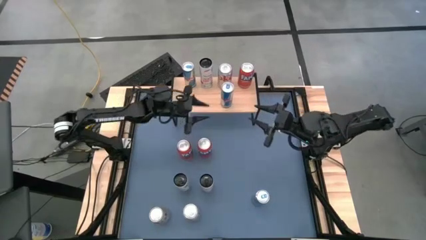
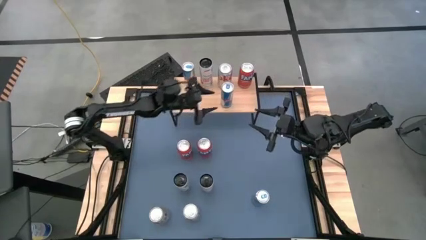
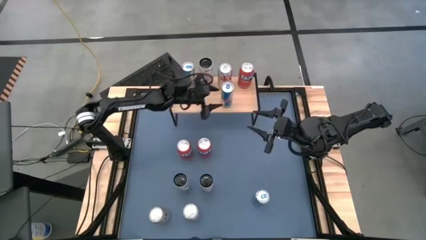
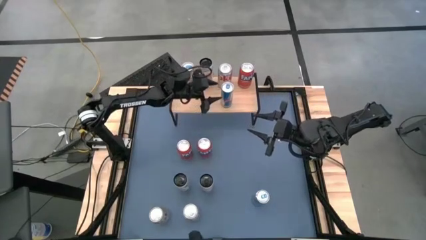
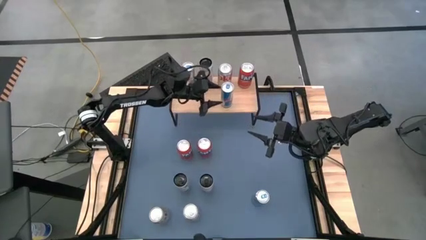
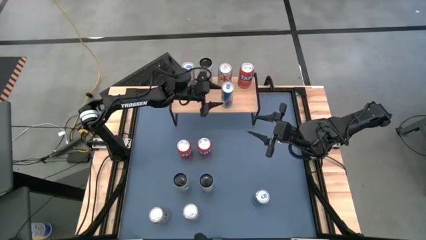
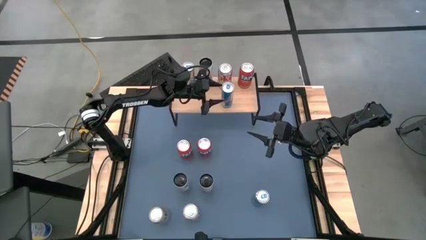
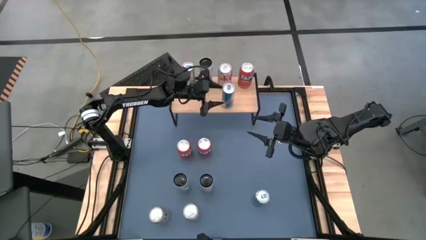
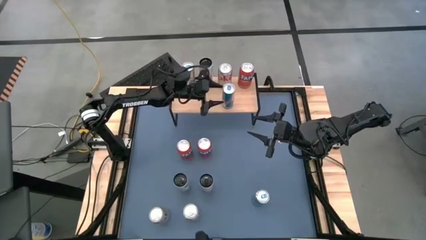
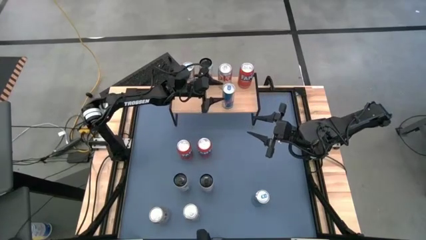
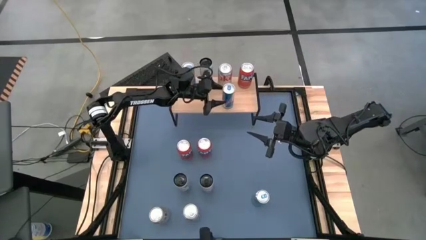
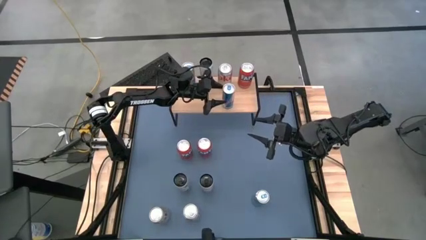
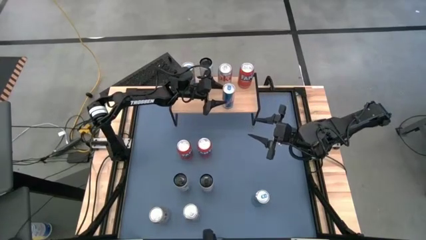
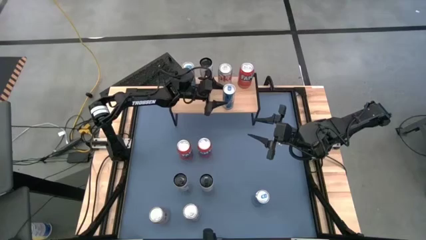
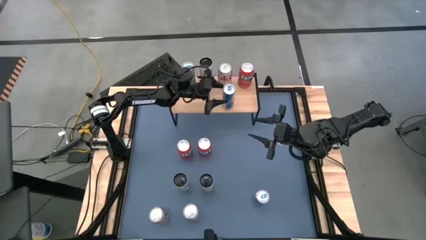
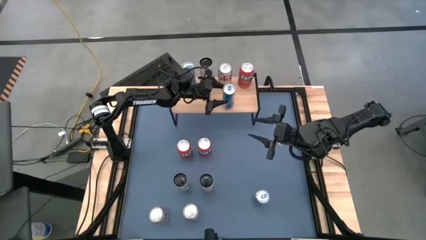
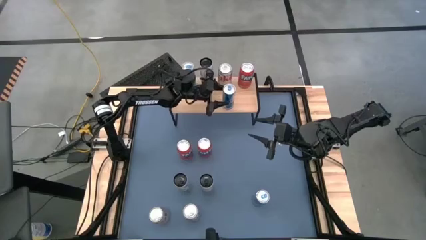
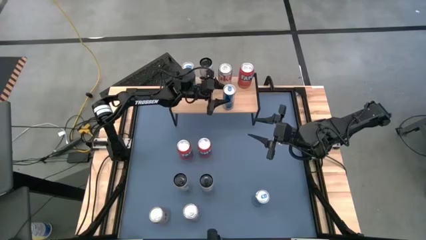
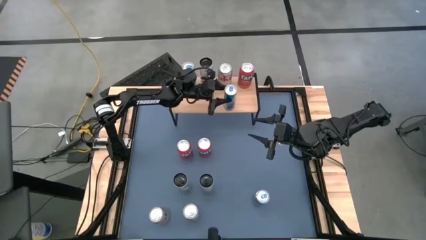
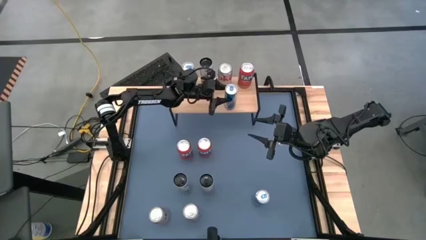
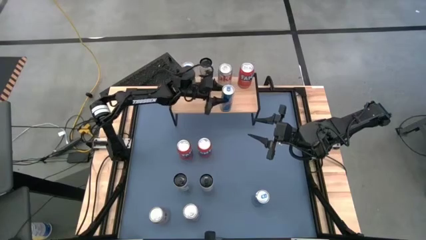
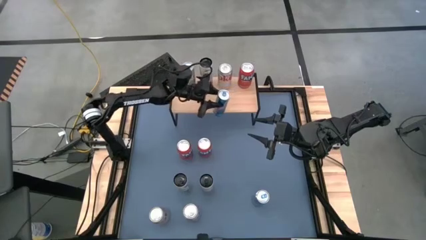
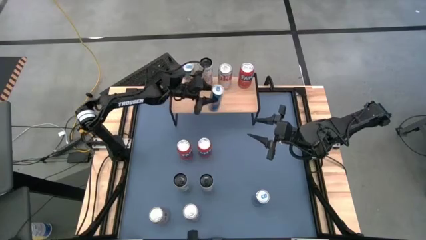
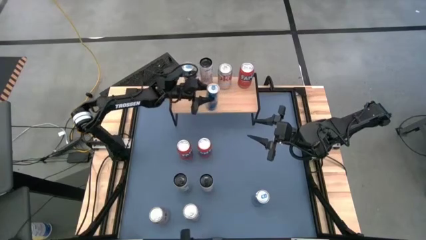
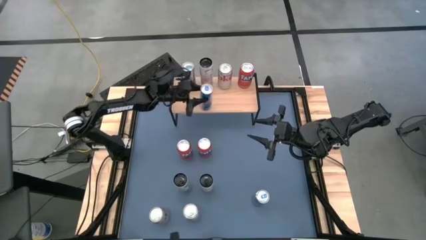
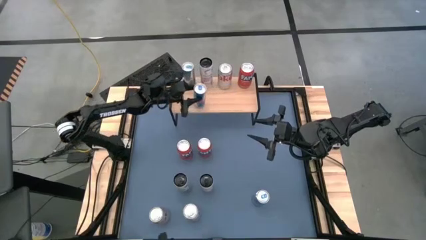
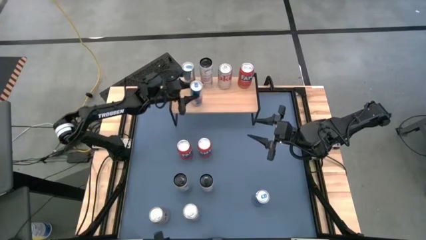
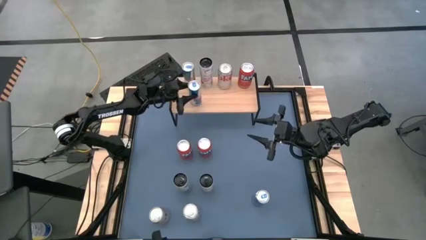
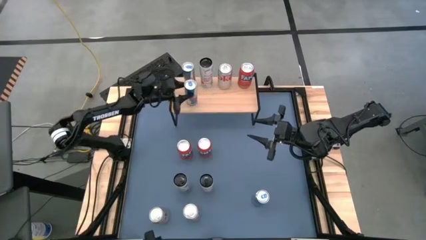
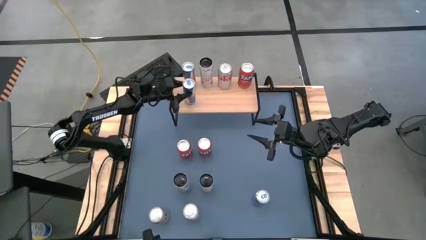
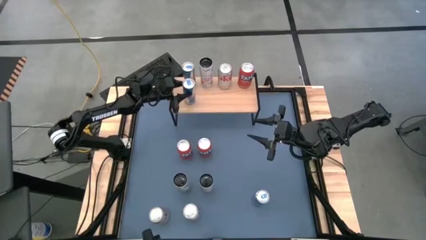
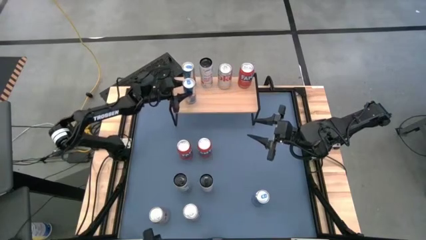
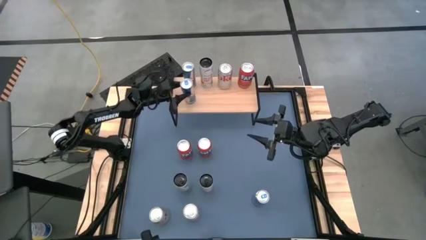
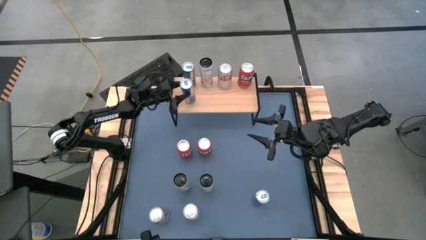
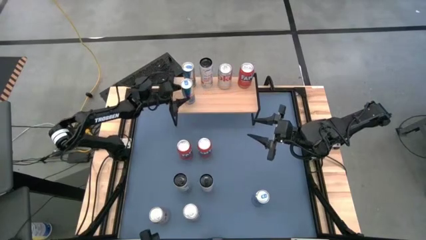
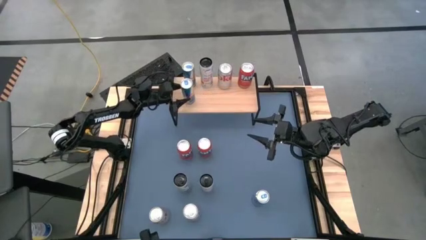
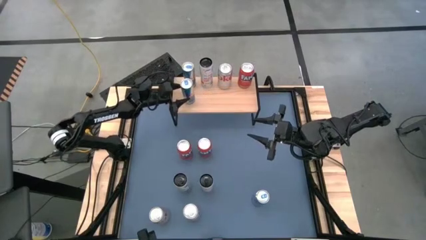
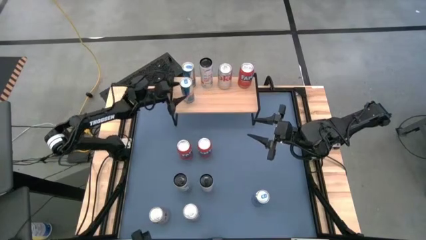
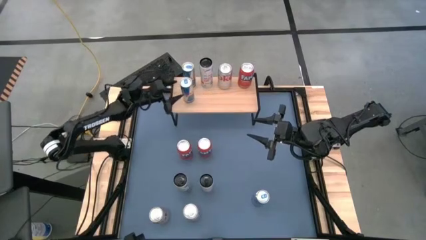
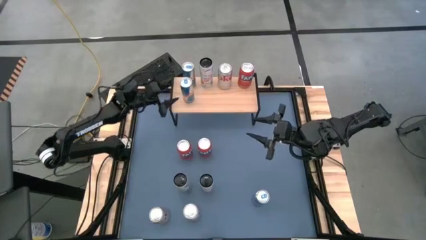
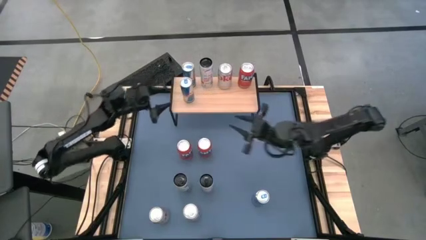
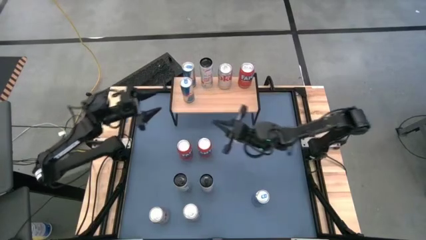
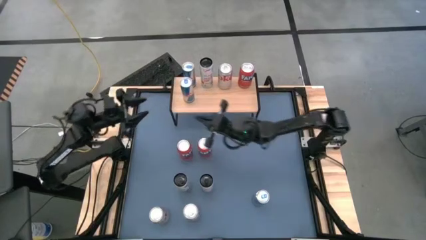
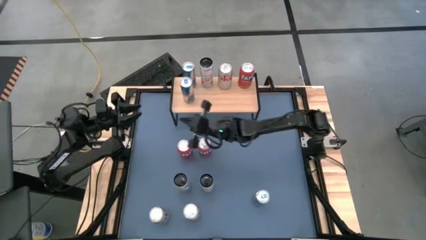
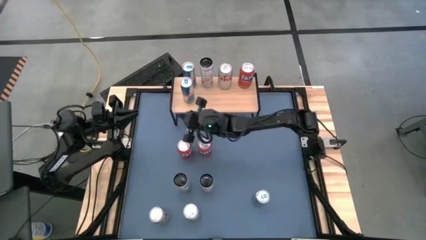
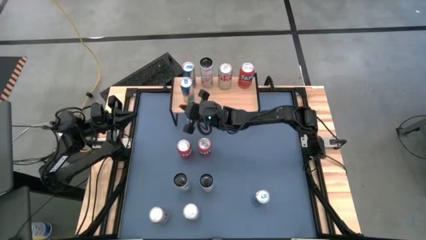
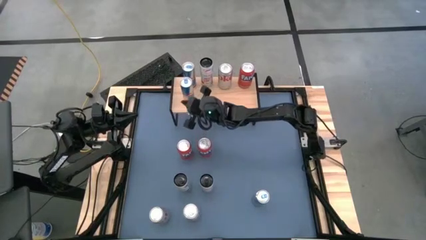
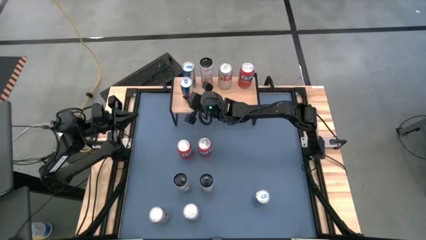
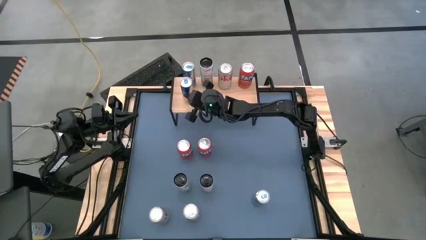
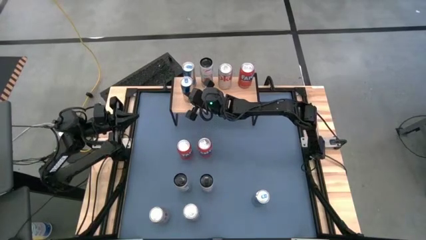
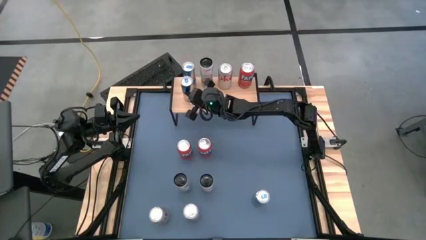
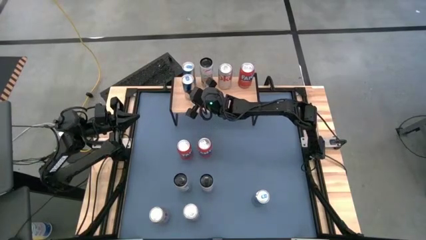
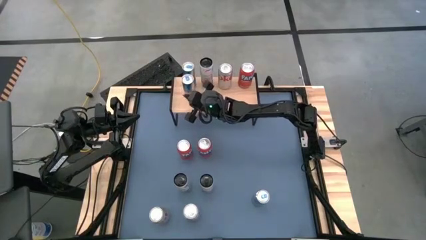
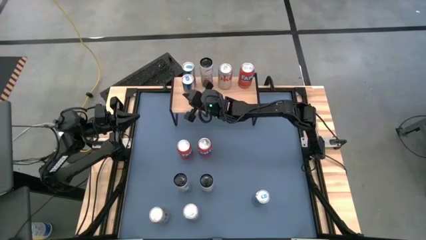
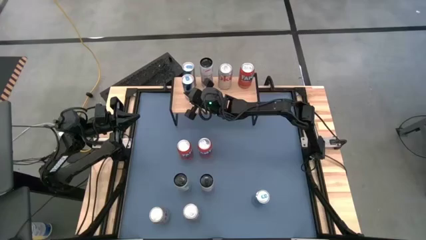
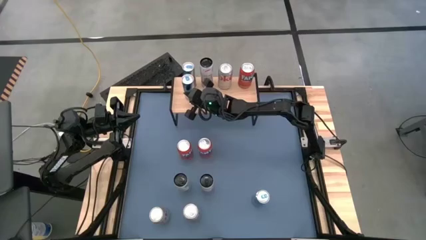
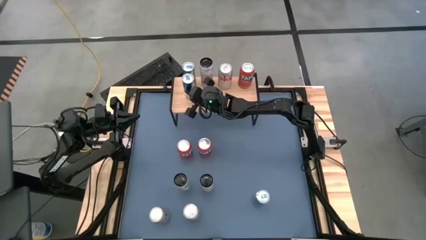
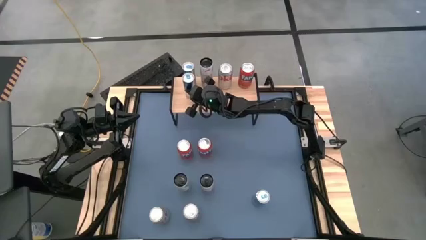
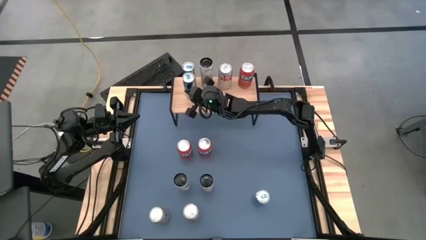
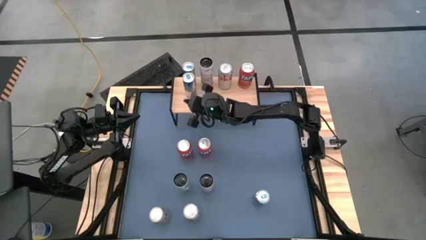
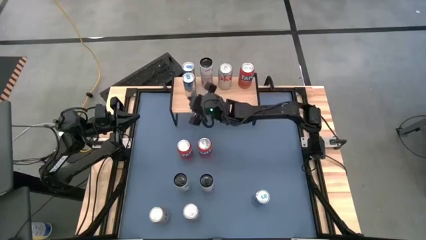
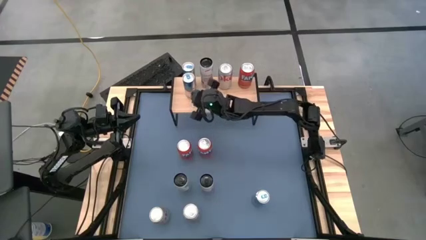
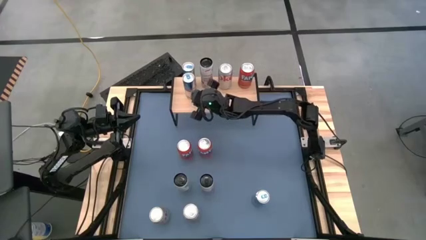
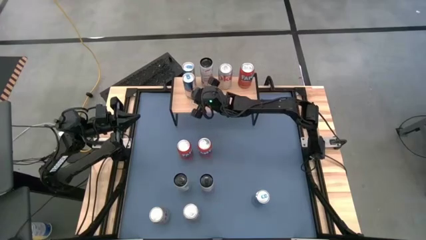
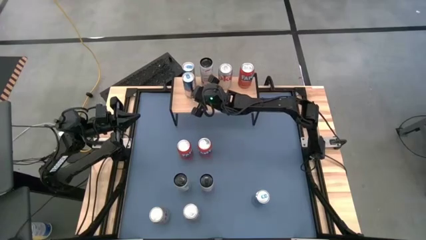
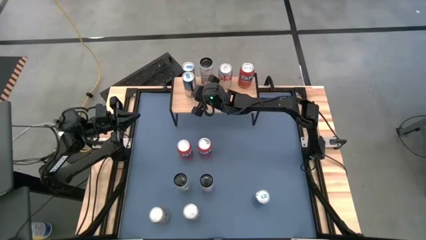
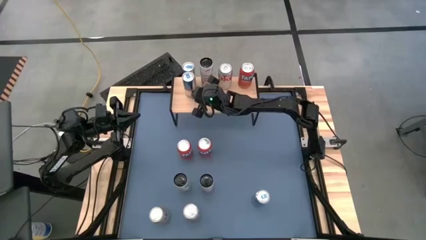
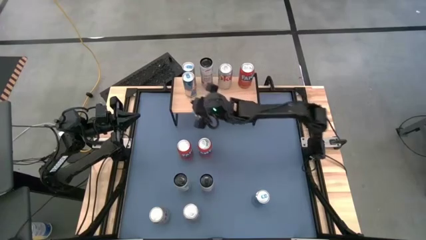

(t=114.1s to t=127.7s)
Task: Place canned beverage on shelf
Put the top blue soda can on the shelf aligned with the other blue soda can
